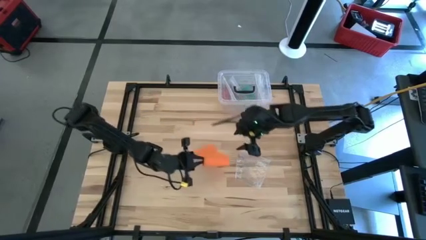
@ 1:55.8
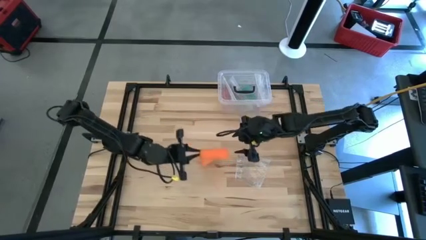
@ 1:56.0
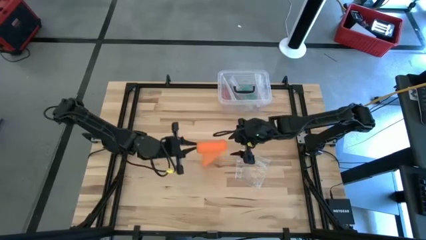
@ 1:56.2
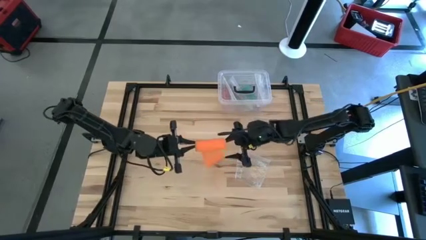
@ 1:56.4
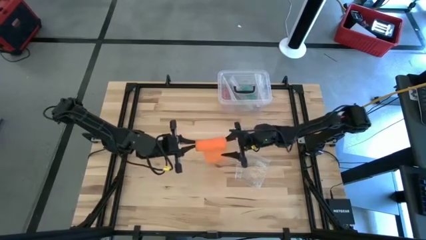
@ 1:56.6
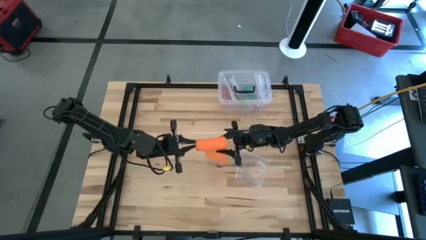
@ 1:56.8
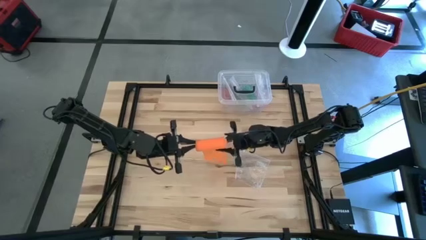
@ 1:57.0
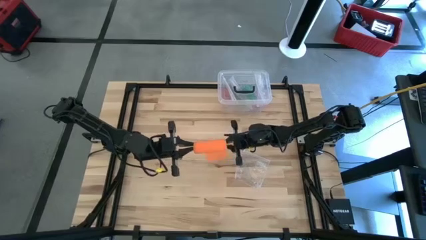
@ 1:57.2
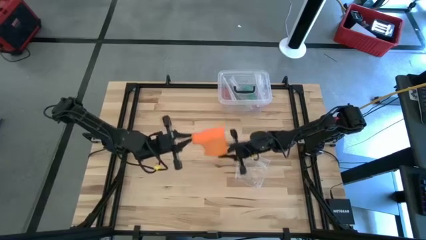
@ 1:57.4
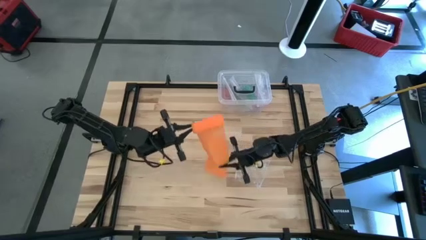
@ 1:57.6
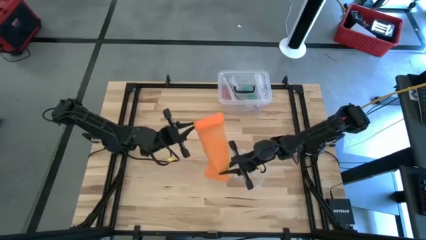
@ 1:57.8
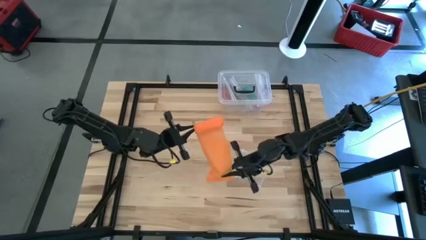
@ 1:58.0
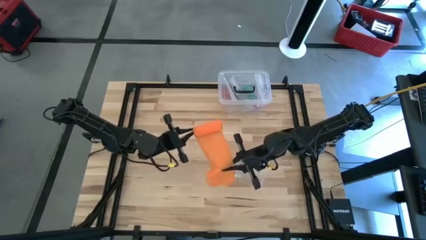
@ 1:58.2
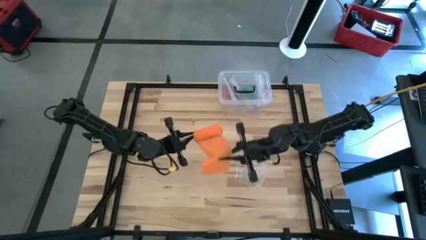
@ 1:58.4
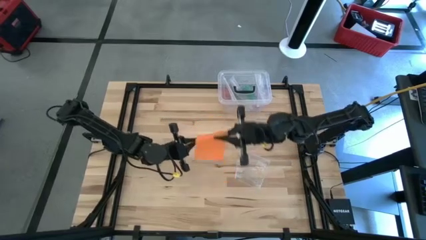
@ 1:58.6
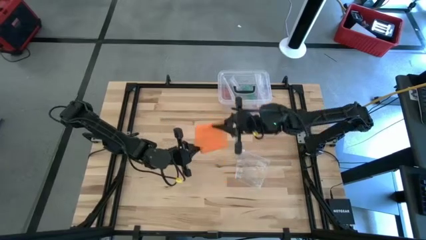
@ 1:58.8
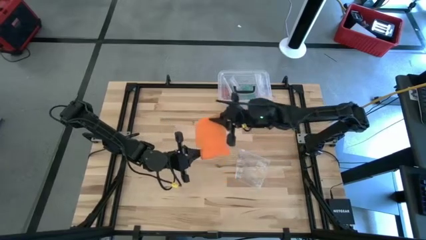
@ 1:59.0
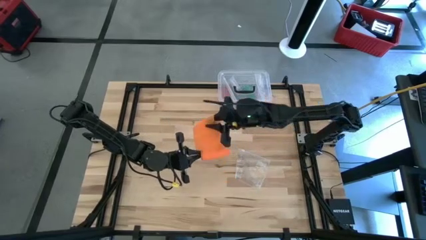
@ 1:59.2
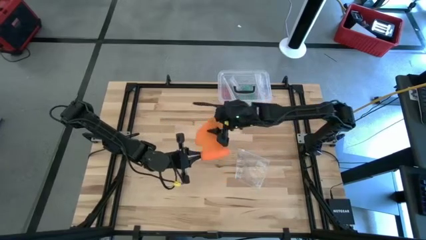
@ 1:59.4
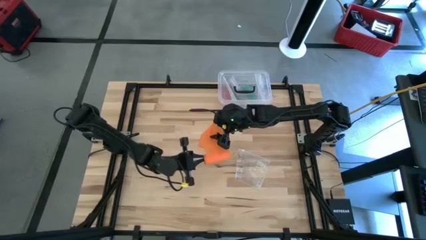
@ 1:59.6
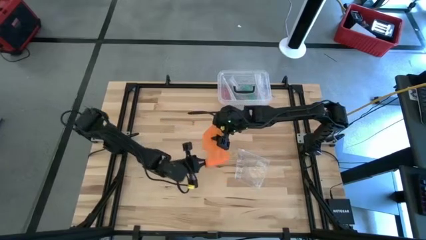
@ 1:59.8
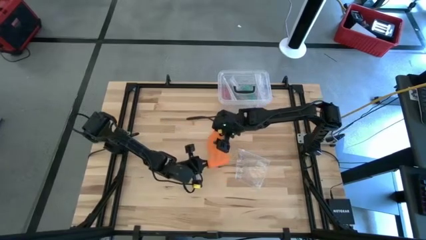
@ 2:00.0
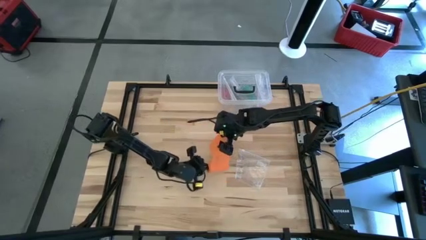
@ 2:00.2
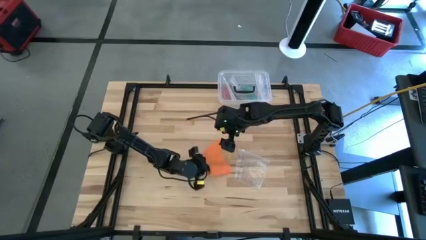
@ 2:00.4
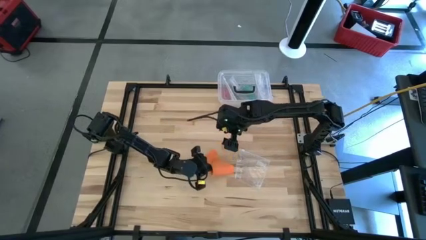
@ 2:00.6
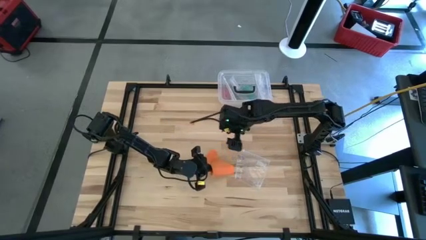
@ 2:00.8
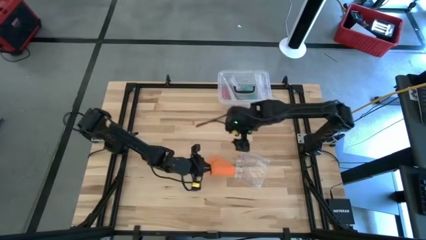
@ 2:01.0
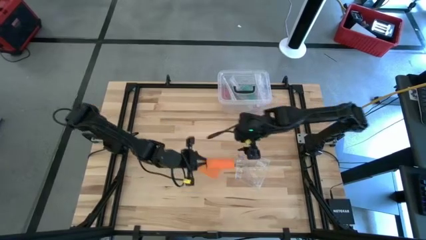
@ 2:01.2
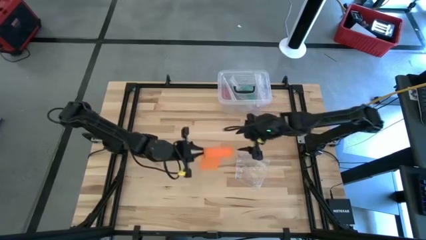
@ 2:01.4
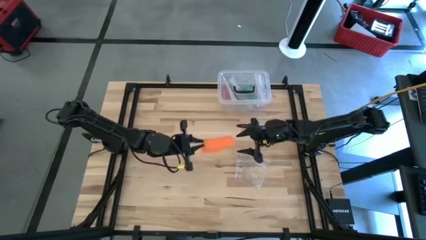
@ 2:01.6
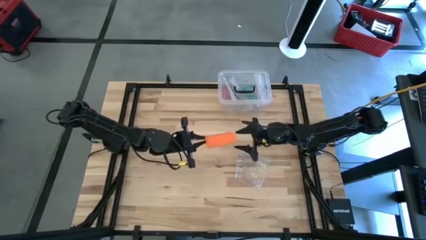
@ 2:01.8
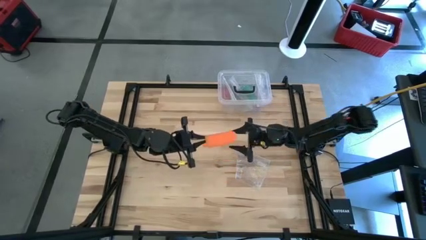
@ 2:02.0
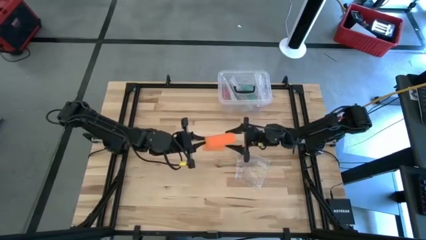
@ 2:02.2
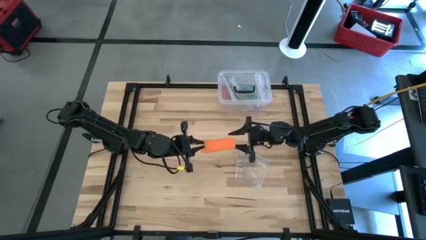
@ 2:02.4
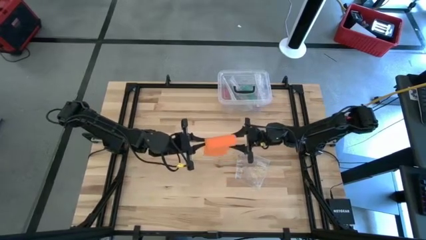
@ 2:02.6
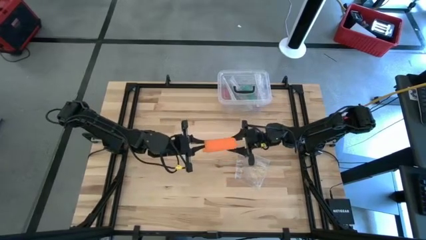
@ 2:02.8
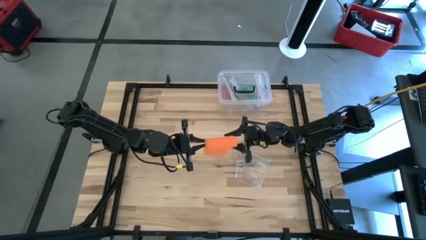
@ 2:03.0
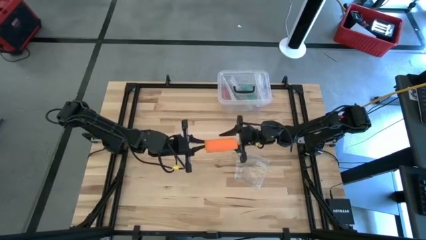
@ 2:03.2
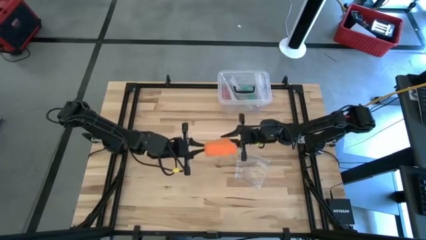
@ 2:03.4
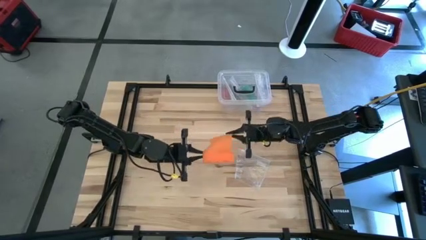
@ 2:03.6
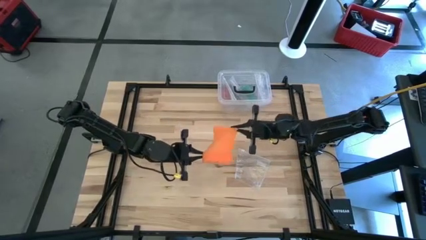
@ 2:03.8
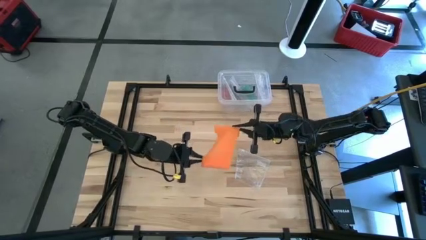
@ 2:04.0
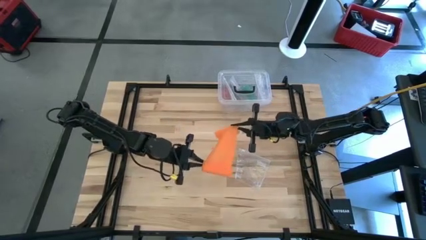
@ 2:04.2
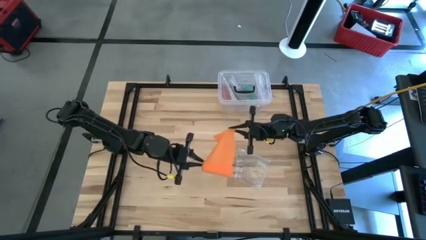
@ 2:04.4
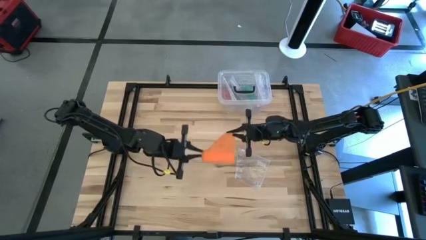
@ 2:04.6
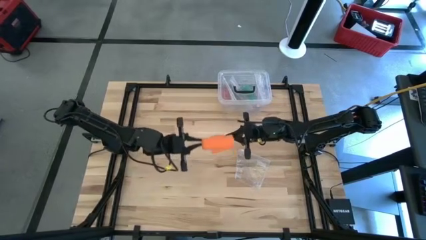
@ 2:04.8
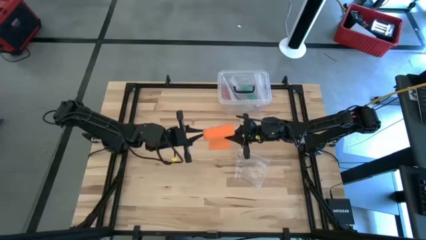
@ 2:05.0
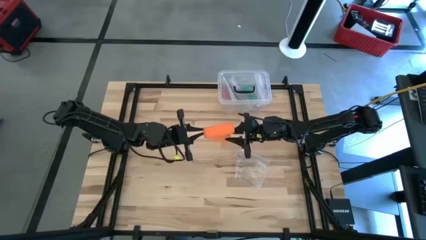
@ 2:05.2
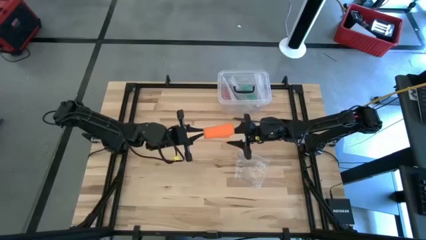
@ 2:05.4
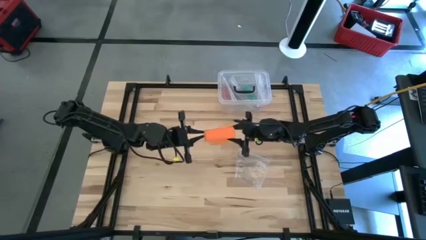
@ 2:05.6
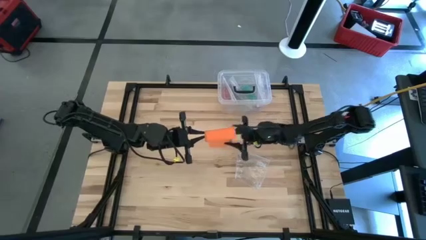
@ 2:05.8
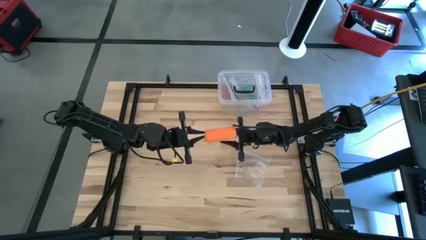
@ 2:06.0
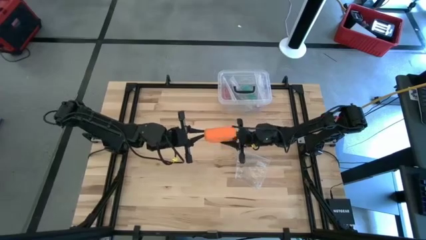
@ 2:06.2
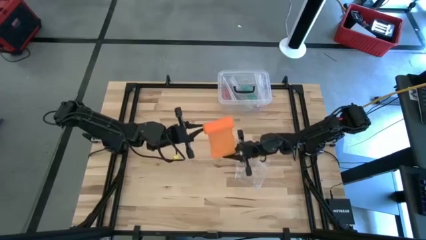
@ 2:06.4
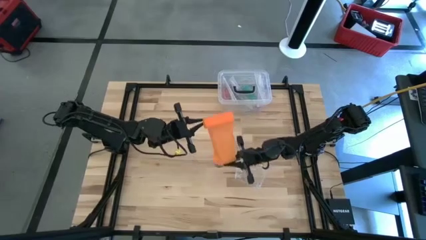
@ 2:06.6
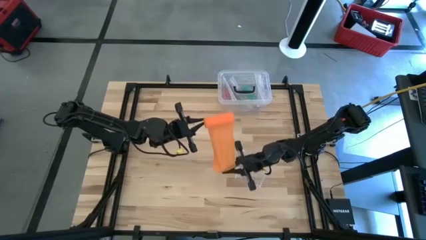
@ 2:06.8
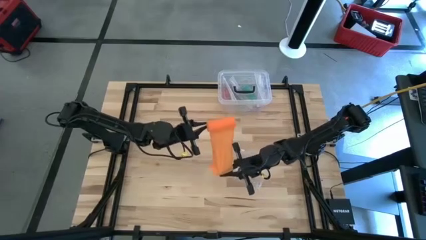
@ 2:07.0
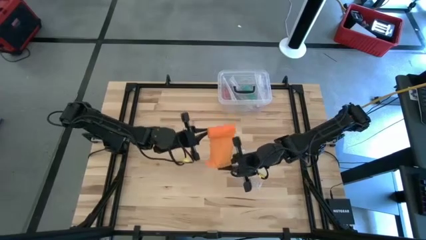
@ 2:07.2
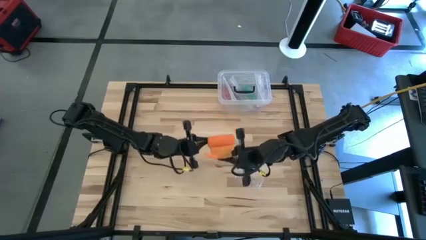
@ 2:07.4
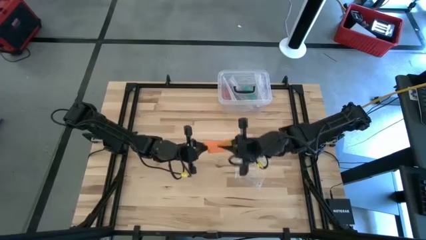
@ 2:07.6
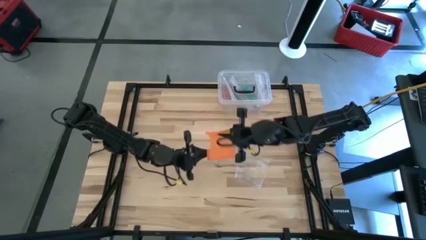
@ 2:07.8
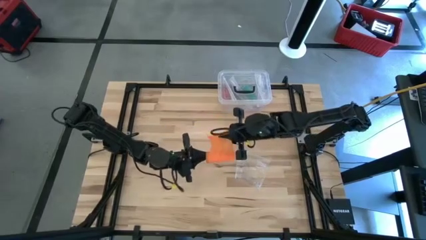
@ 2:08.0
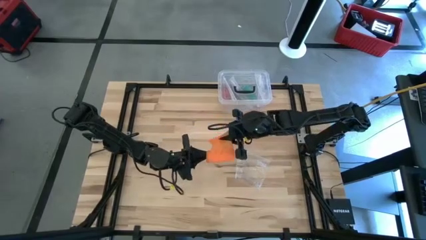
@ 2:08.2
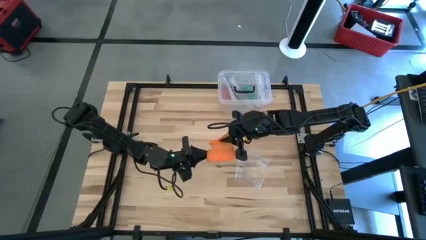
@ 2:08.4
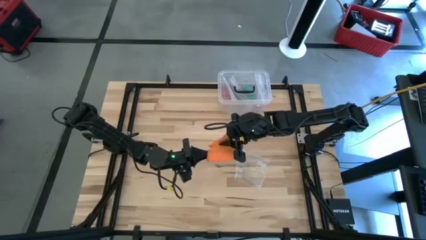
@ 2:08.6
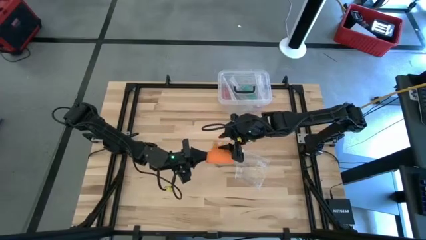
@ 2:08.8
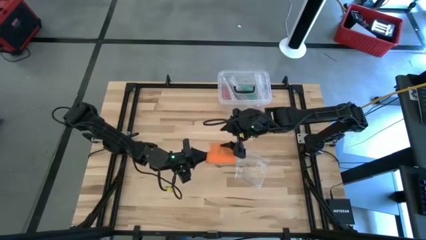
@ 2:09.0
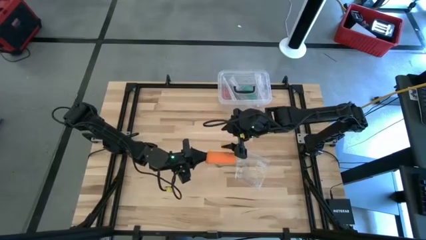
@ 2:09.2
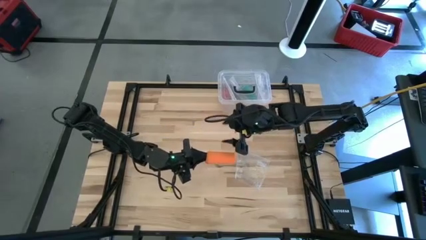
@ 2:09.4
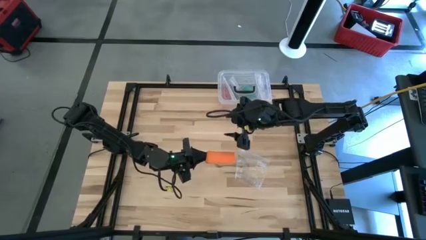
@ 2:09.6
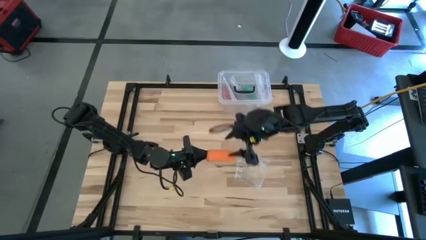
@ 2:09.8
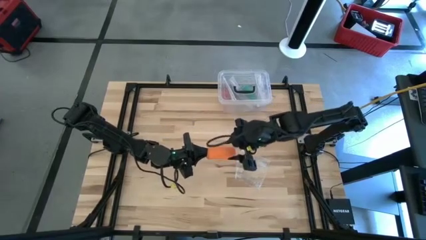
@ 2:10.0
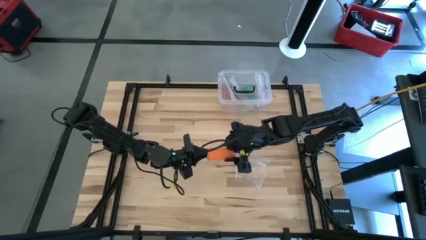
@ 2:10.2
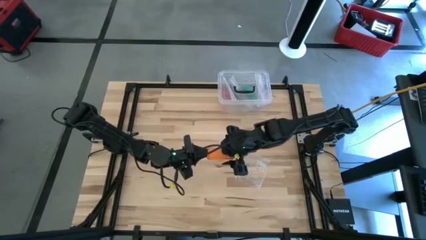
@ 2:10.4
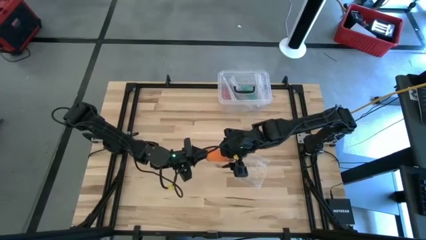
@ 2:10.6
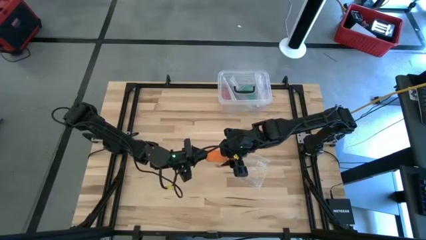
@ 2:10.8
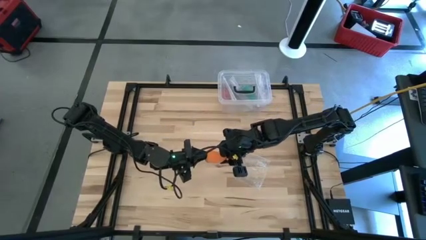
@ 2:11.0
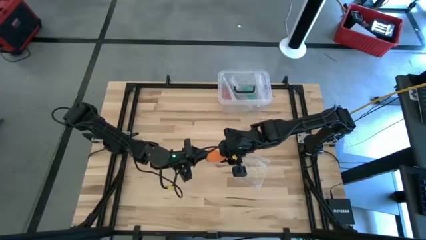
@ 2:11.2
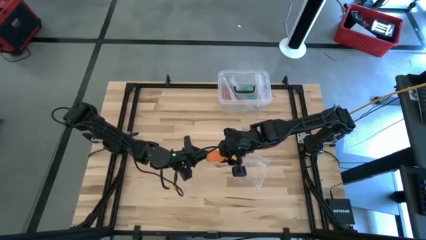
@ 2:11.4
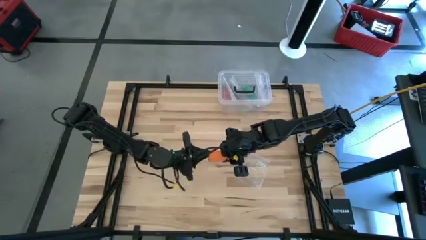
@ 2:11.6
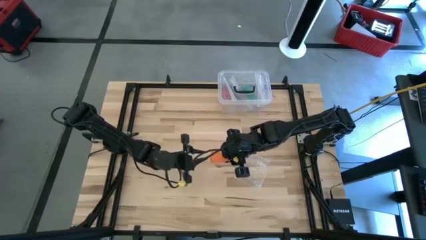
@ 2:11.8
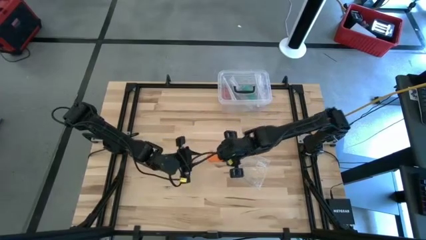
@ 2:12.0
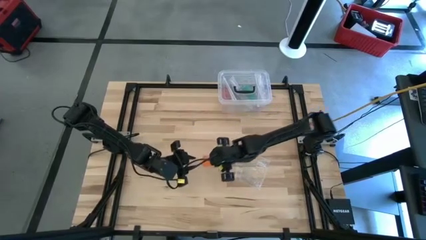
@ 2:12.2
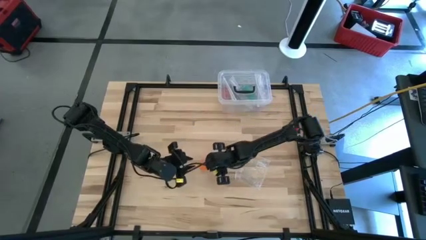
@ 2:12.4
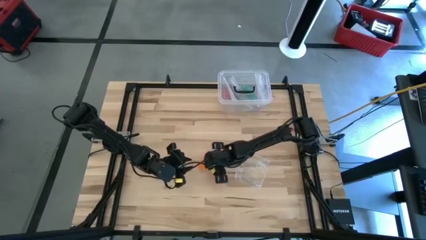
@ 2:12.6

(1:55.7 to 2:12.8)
Task: Roll bandage
Roll the orange bandage
